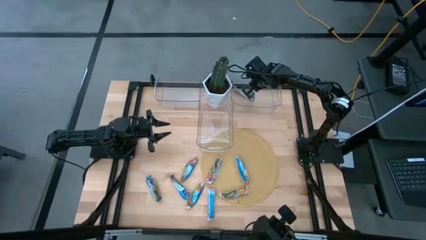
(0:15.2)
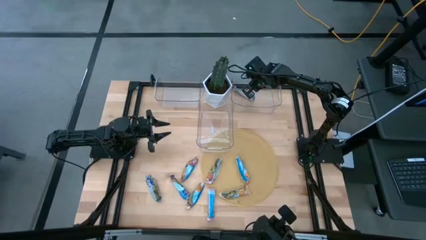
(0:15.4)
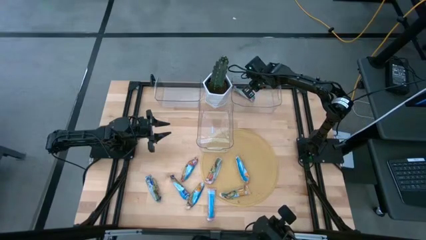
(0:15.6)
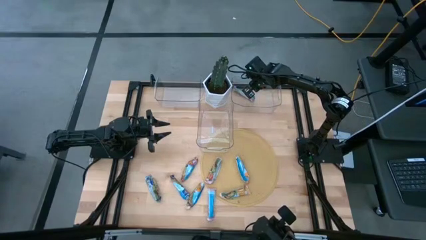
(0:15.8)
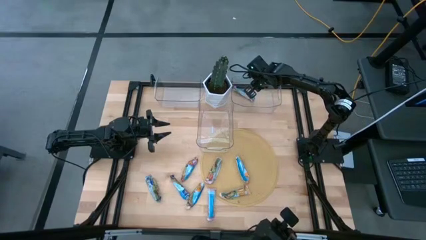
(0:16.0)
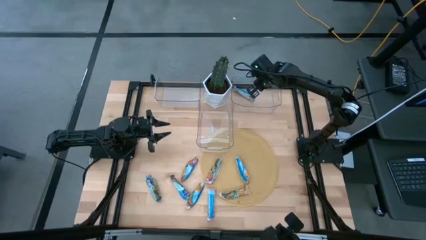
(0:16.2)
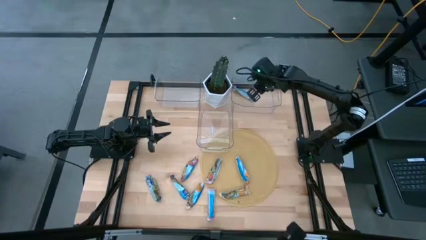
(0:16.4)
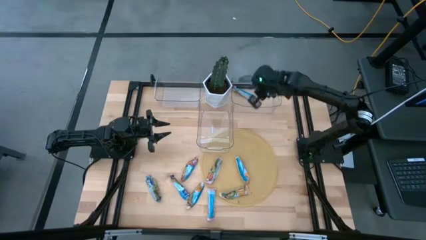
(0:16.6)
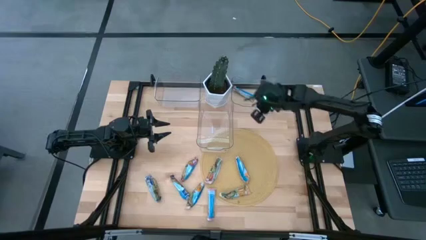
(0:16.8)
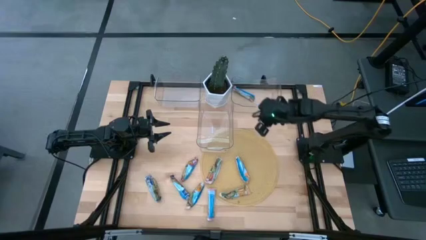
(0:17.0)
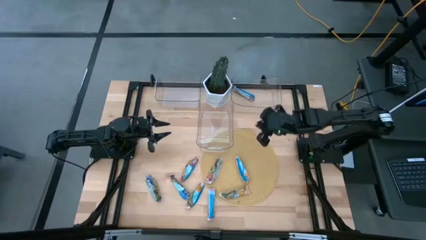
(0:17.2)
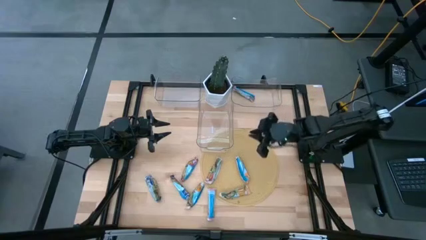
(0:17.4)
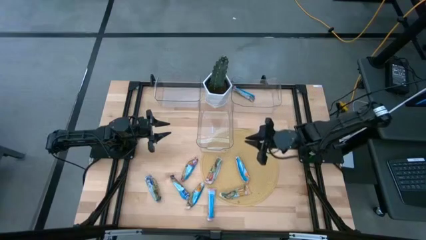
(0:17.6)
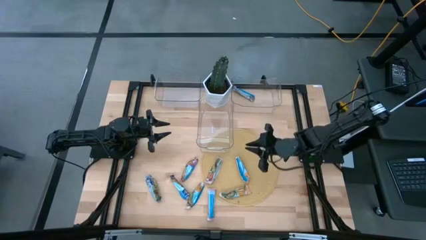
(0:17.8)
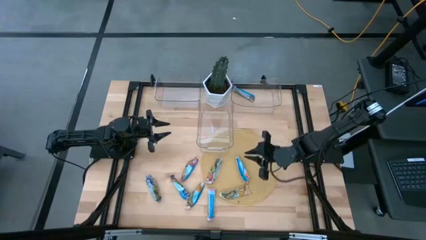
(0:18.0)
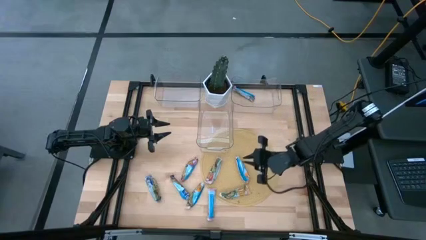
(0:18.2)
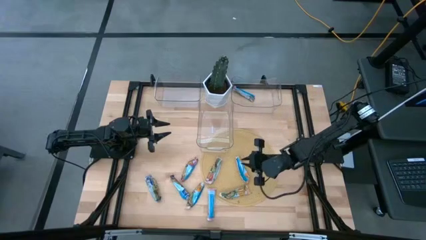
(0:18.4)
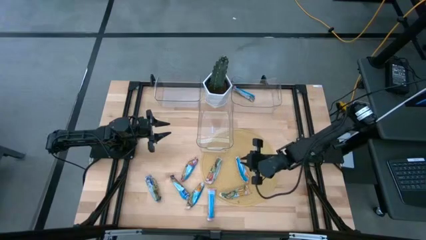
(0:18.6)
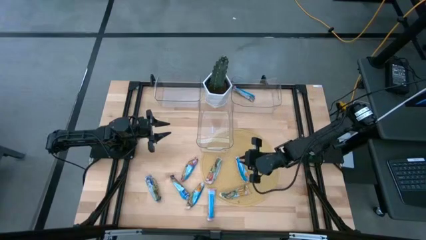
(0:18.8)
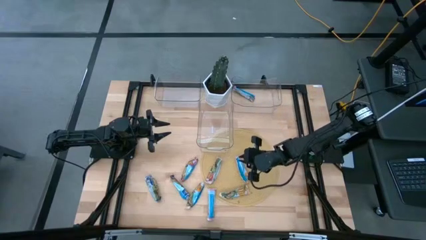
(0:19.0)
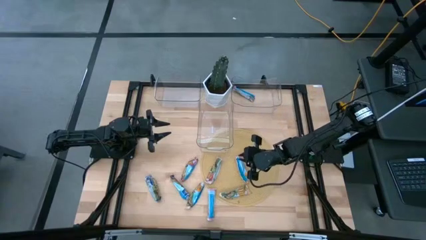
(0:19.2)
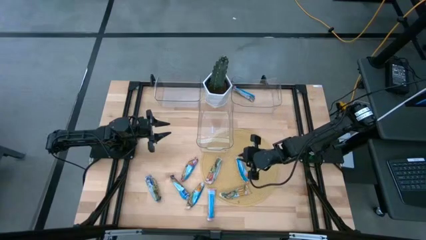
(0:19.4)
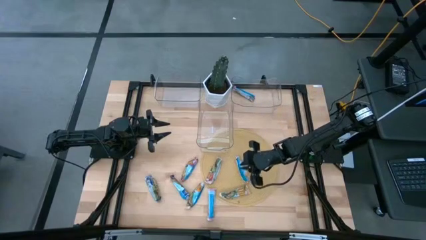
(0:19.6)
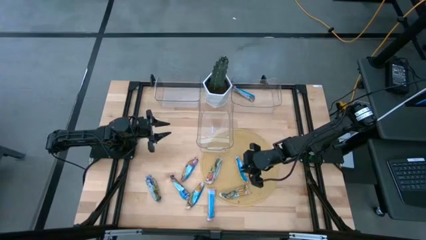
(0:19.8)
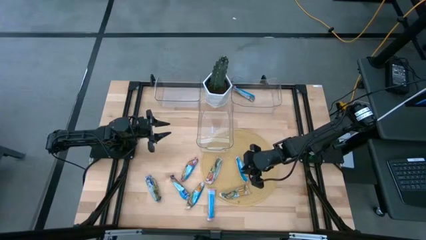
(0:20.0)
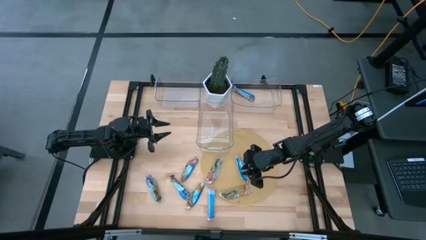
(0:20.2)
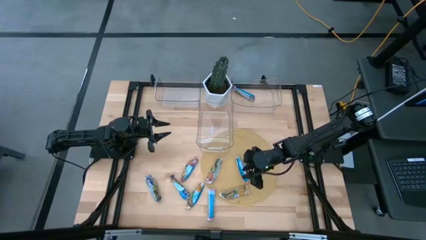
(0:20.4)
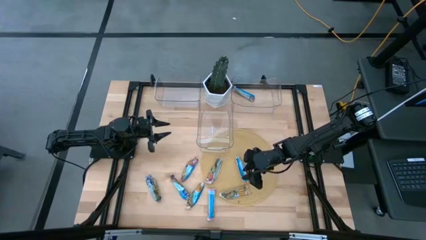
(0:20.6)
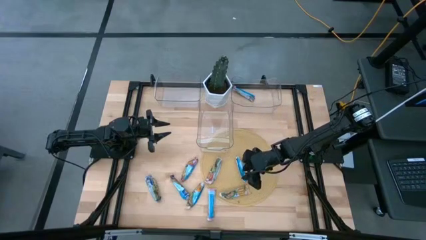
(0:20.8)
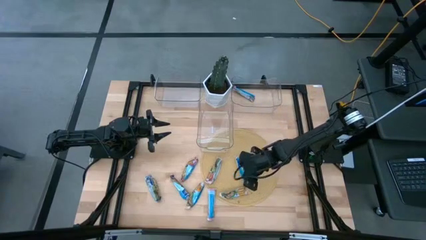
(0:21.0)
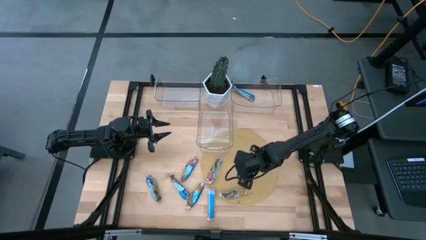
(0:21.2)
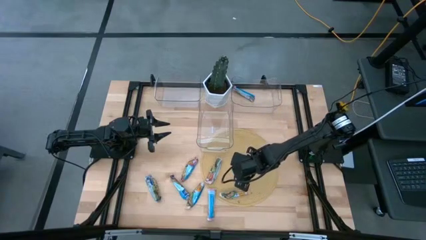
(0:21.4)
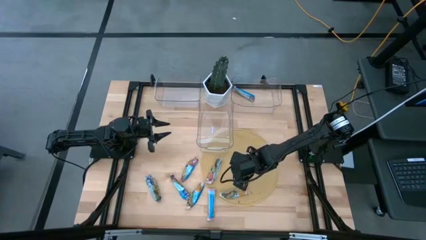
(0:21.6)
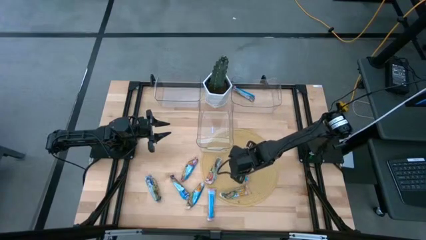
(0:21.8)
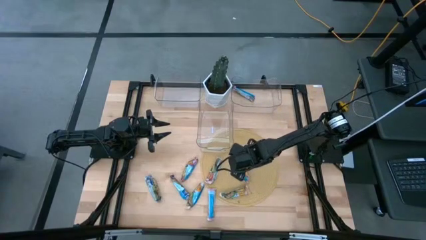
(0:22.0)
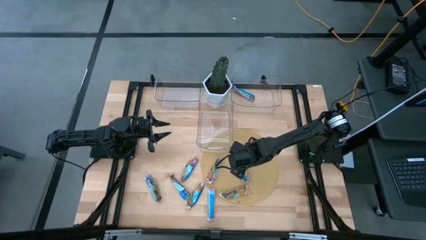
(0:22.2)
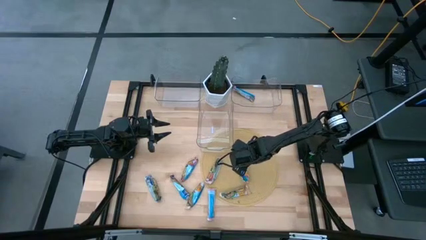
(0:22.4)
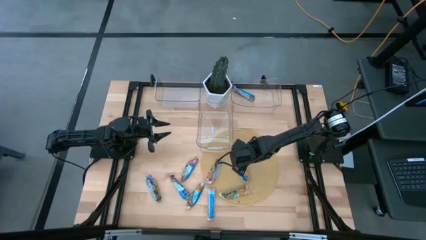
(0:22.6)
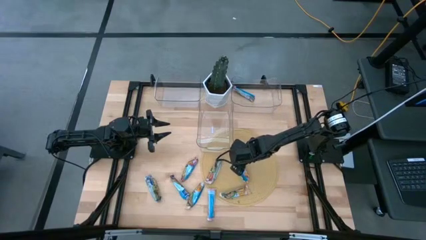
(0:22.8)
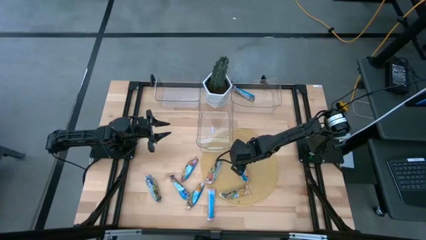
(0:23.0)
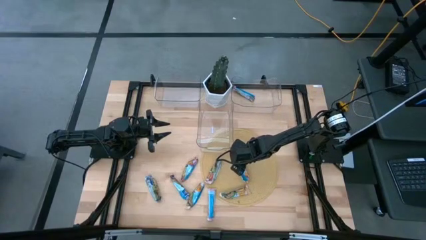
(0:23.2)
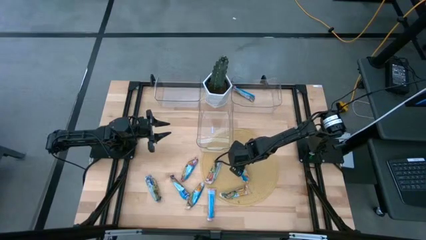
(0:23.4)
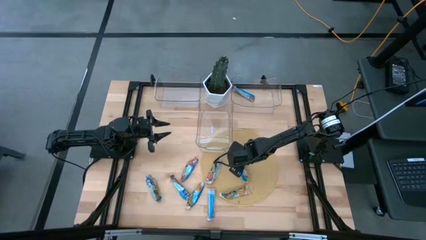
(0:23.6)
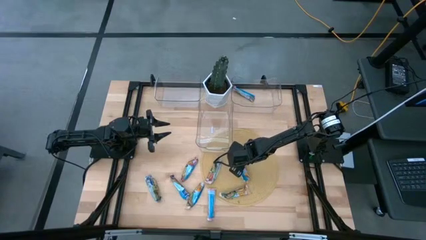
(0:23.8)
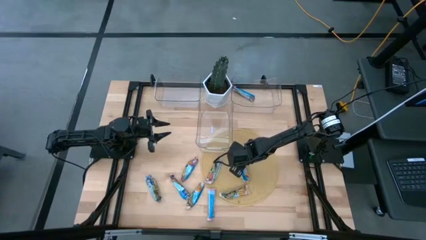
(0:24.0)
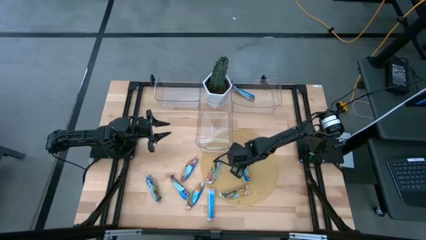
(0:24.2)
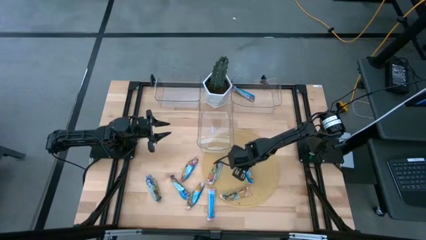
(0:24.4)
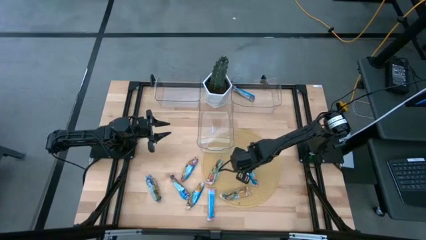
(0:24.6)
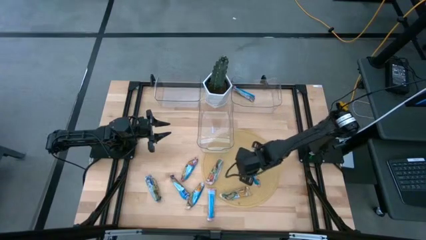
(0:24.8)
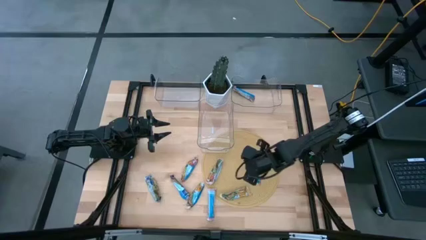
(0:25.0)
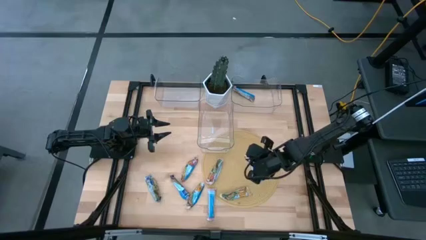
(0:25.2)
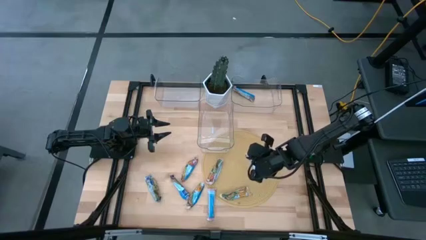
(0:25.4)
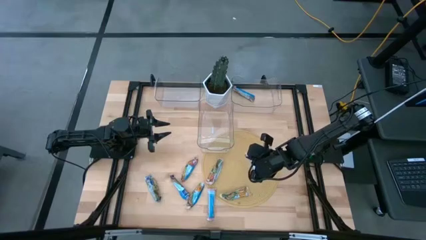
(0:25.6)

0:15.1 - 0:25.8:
Task: Pick and place Granola Bars by type
Put the yellow green granola bar into the left transparent bin

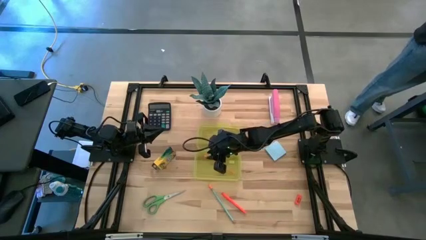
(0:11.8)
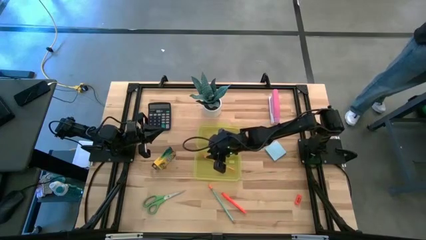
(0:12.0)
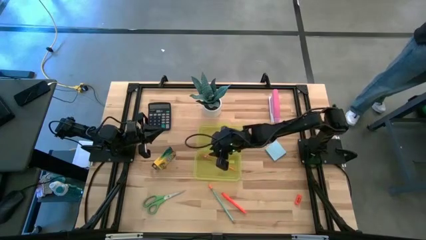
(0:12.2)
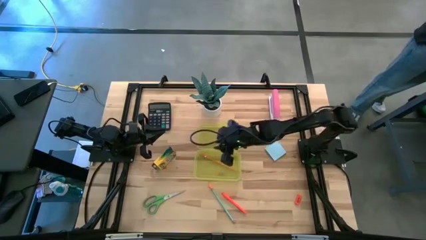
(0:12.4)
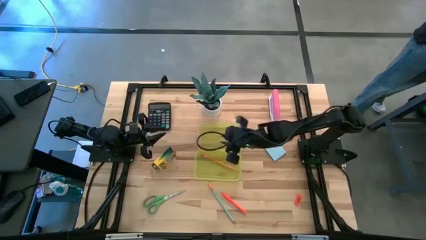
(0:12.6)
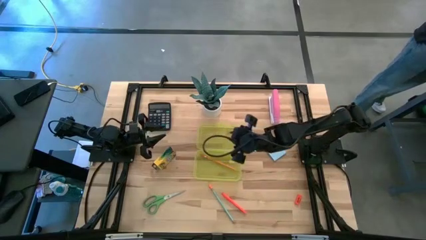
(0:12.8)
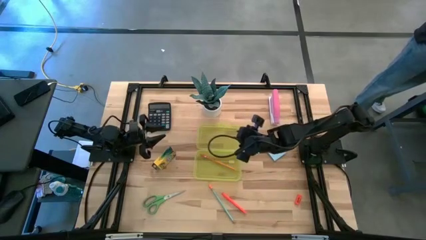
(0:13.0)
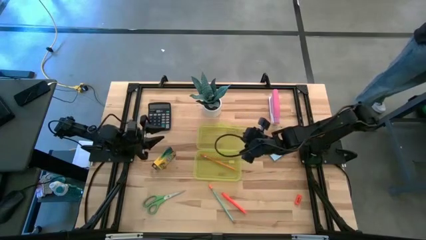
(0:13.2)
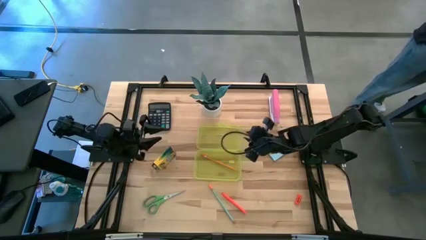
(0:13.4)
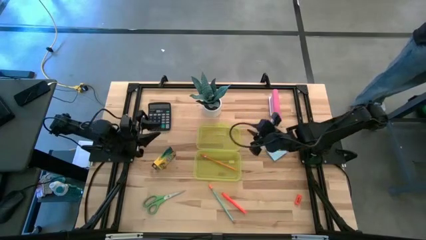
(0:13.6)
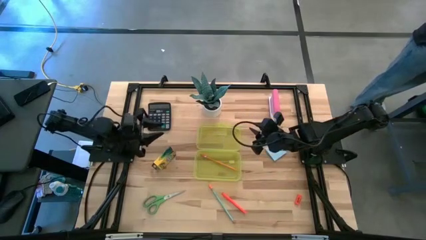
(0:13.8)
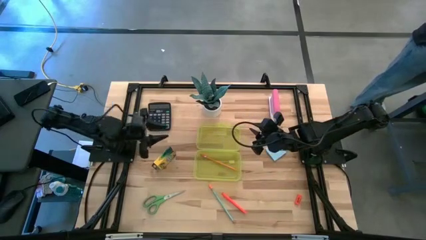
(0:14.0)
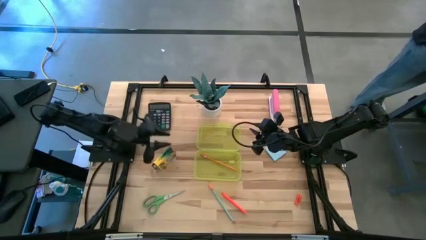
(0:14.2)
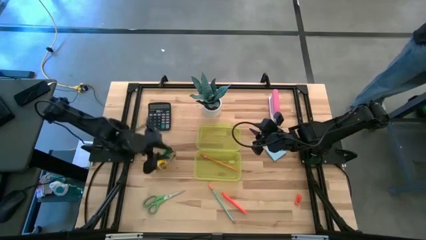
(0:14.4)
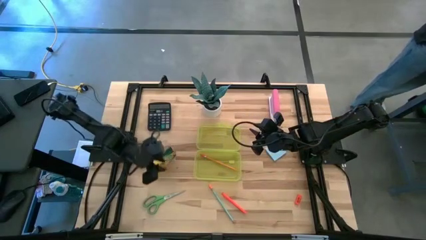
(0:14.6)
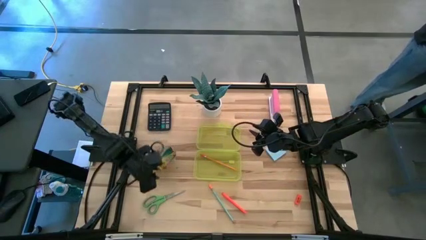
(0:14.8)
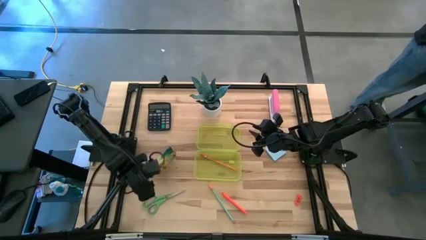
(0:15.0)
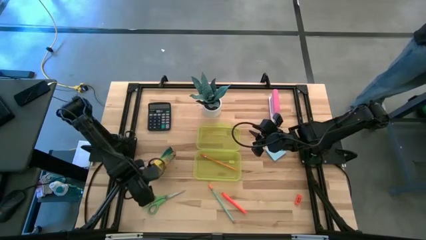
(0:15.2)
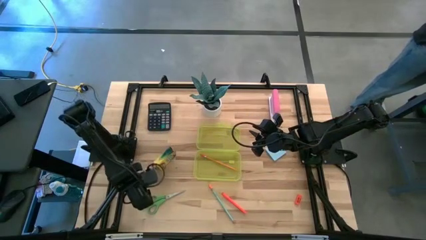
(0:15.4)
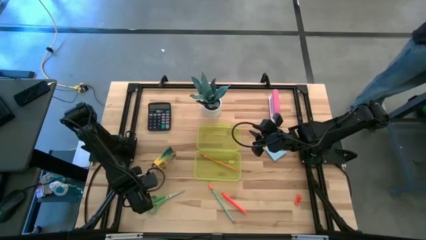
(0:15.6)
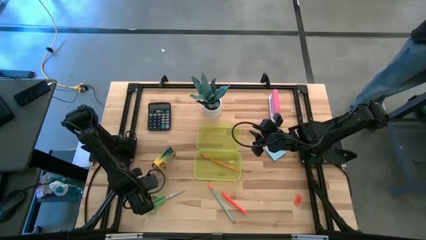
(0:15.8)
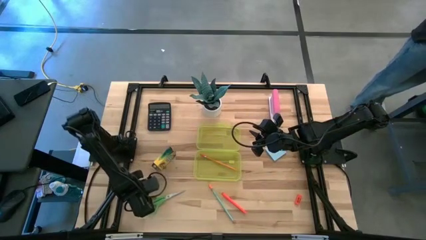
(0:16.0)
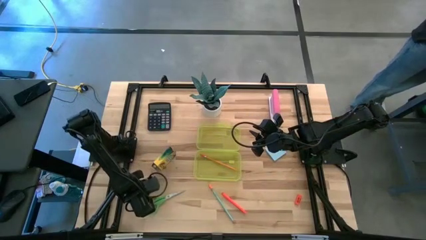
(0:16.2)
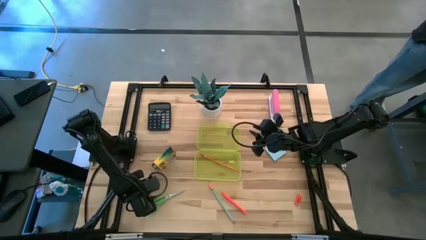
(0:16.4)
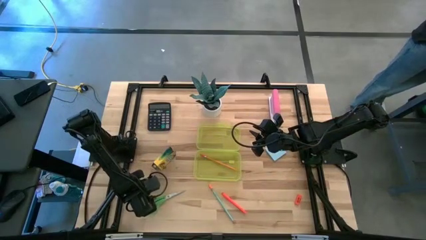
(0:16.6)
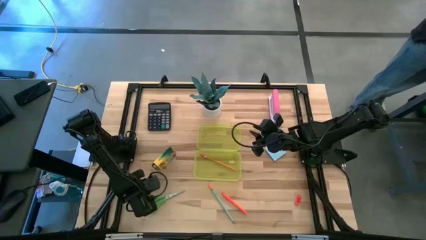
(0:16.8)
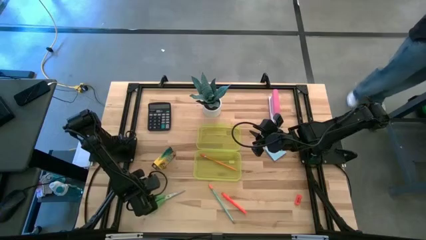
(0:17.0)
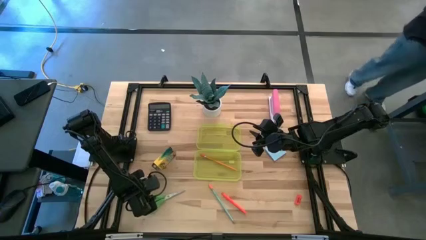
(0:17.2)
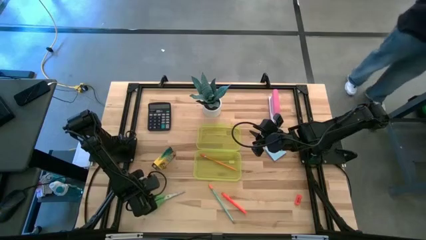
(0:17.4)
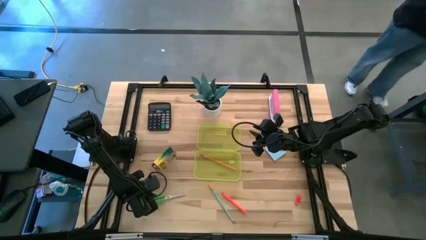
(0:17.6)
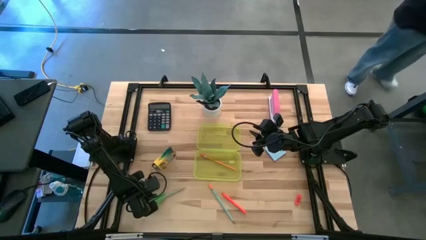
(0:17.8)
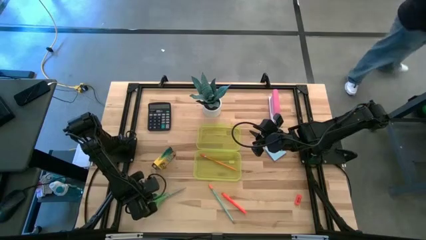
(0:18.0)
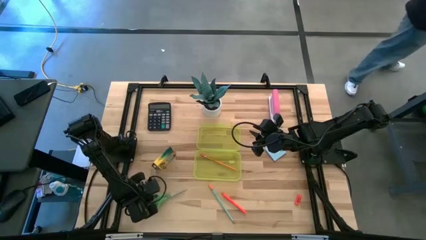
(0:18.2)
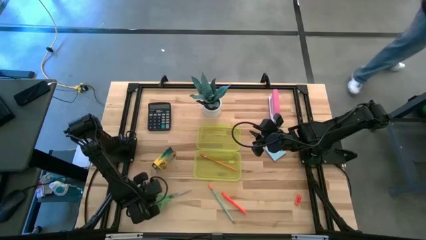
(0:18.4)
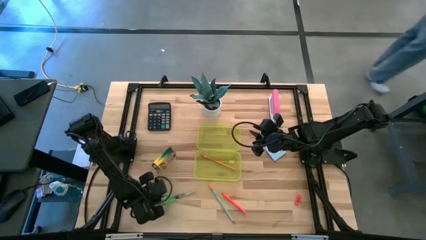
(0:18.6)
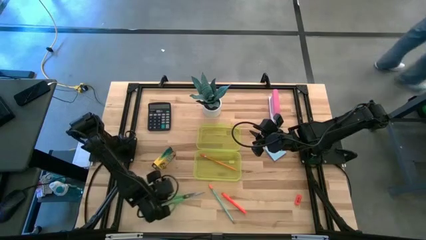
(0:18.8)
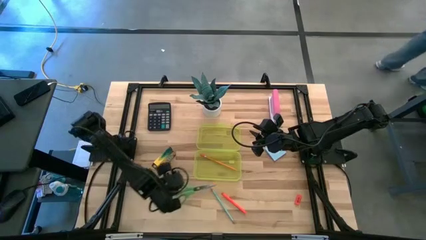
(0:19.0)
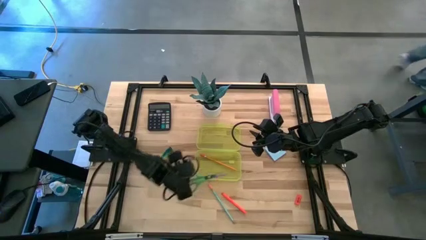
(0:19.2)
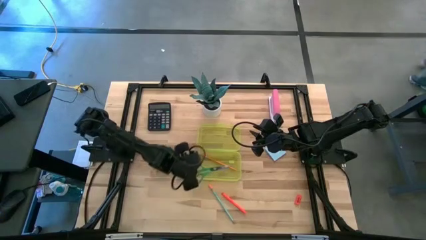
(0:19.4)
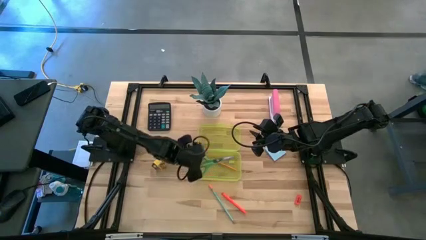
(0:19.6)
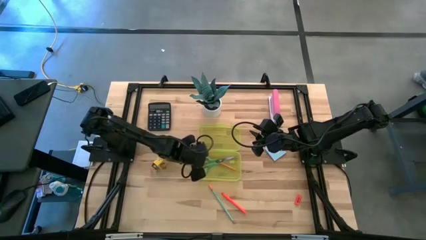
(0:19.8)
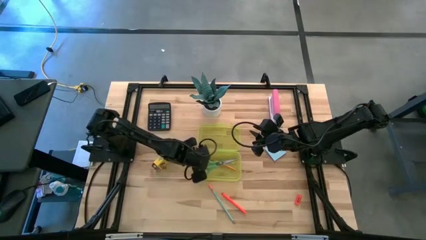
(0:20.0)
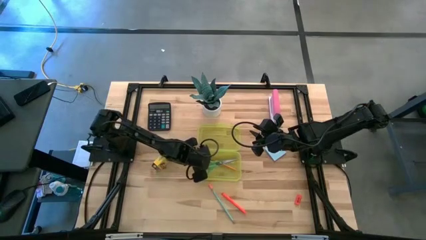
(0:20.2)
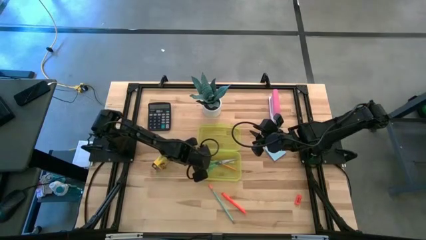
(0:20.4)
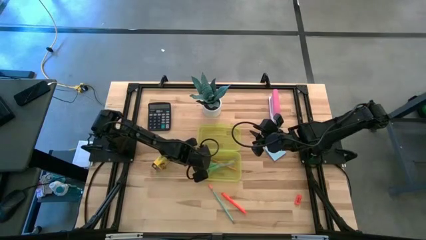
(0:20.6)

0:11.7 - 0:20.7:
Task: Pack school essentials
Put the scissors into the yellow box
